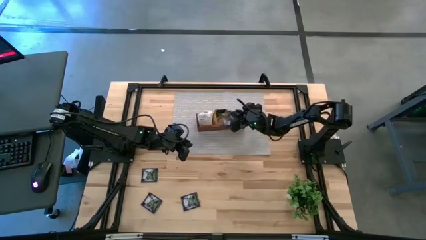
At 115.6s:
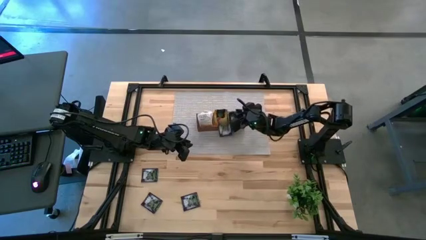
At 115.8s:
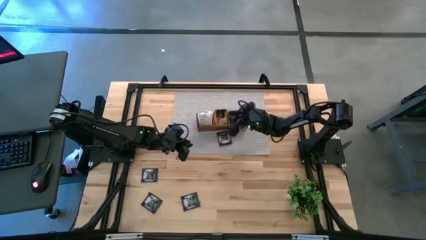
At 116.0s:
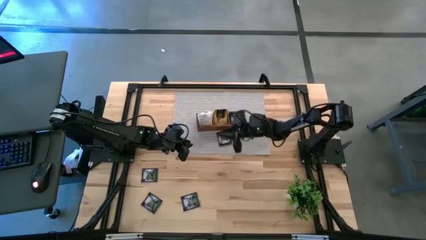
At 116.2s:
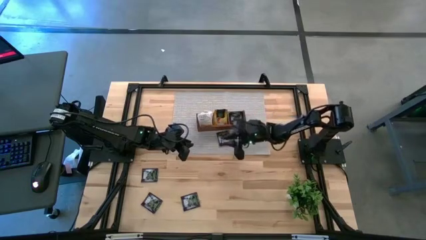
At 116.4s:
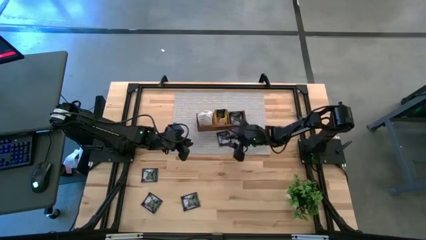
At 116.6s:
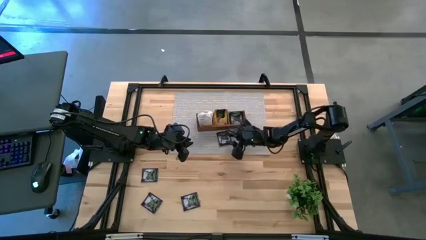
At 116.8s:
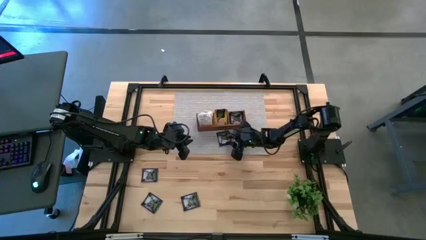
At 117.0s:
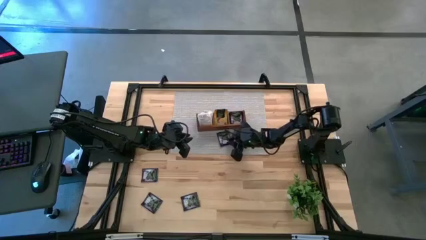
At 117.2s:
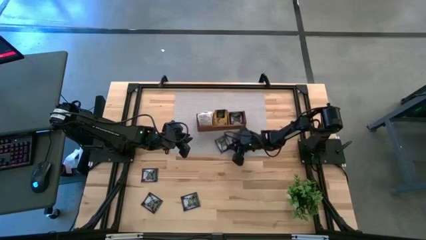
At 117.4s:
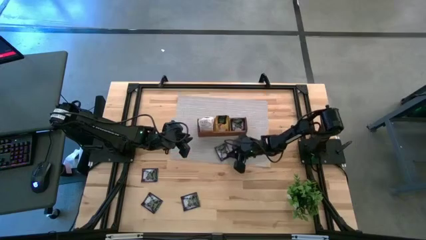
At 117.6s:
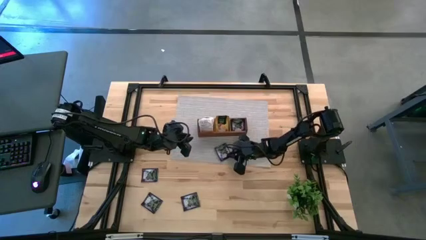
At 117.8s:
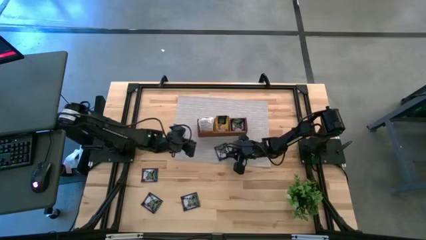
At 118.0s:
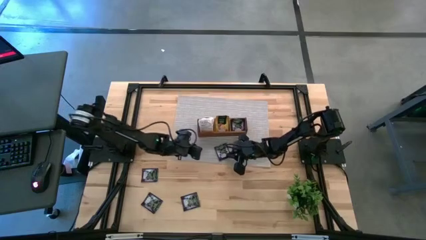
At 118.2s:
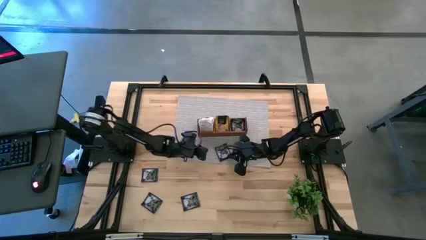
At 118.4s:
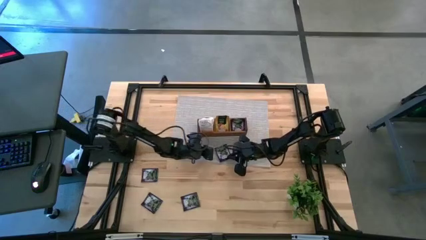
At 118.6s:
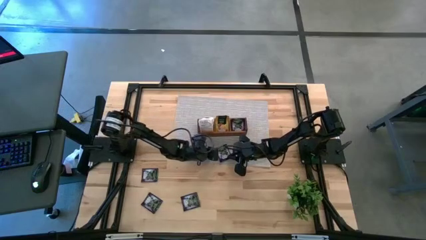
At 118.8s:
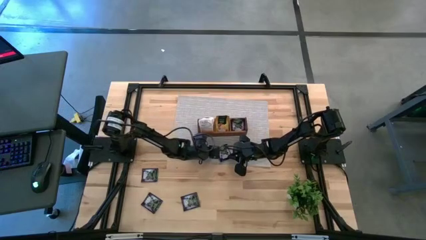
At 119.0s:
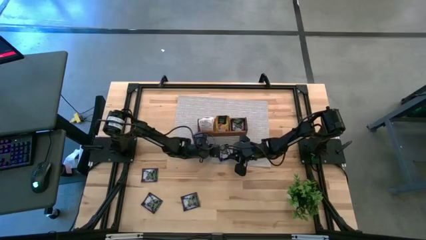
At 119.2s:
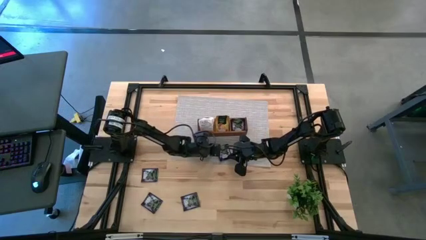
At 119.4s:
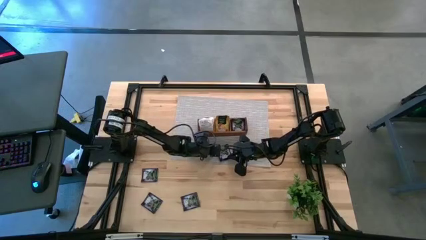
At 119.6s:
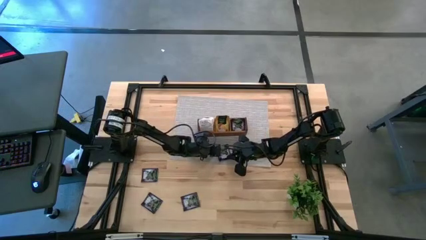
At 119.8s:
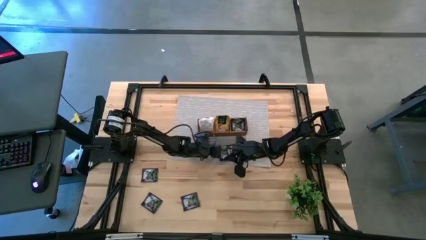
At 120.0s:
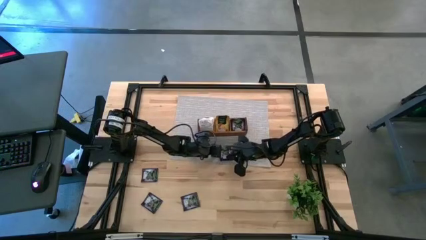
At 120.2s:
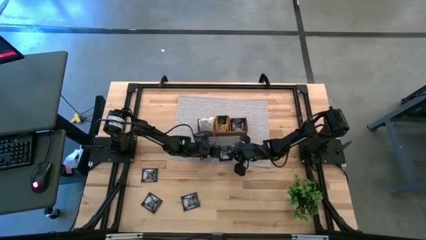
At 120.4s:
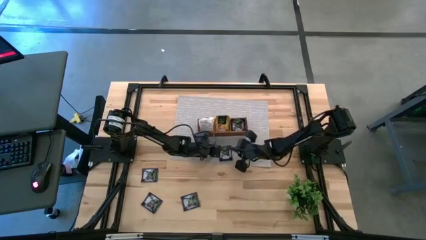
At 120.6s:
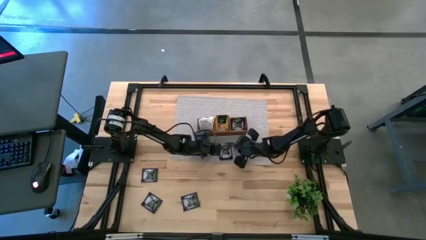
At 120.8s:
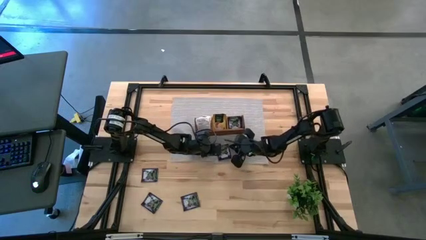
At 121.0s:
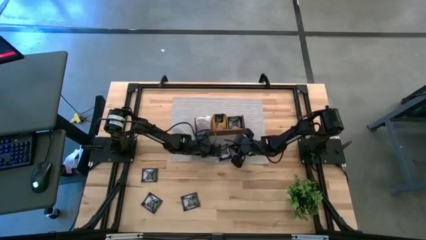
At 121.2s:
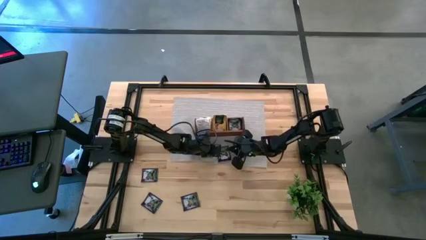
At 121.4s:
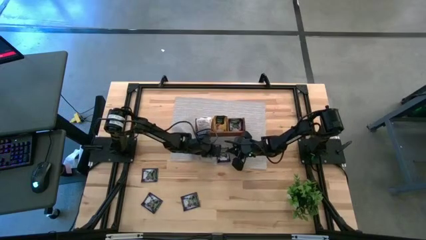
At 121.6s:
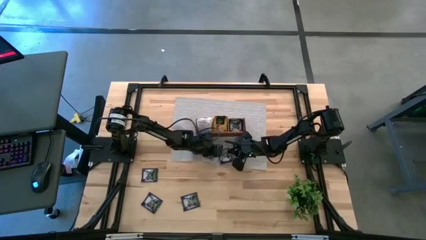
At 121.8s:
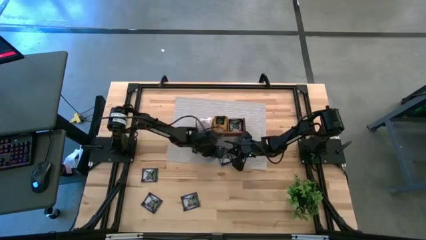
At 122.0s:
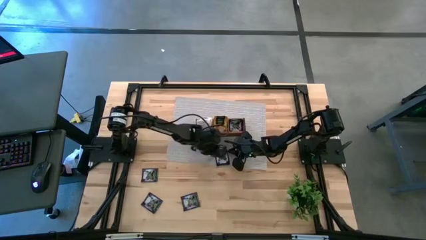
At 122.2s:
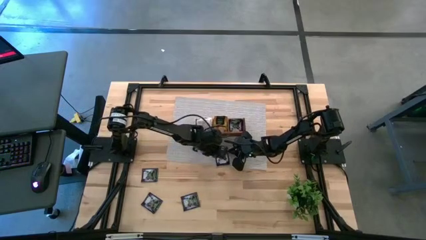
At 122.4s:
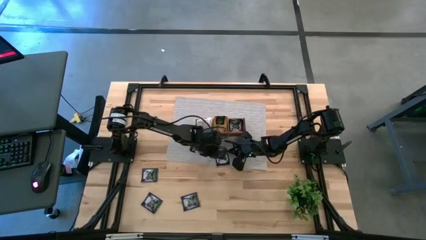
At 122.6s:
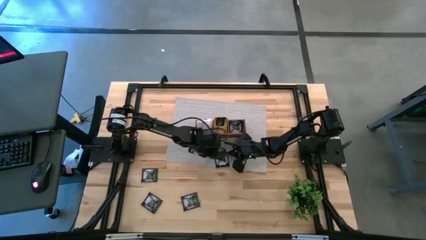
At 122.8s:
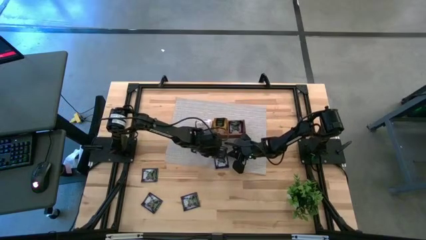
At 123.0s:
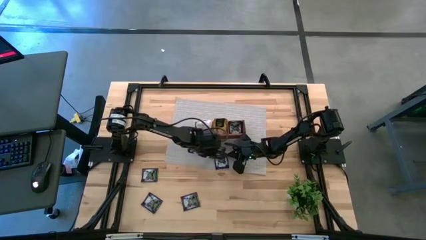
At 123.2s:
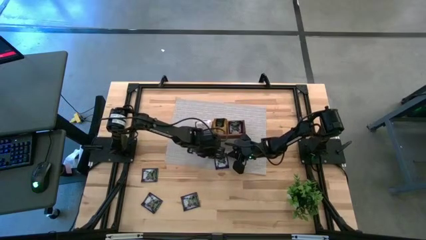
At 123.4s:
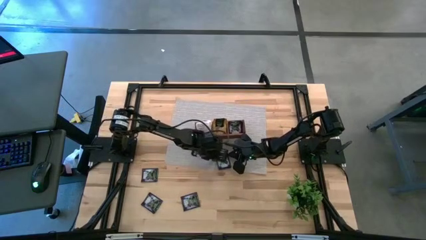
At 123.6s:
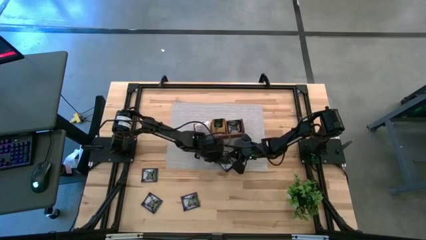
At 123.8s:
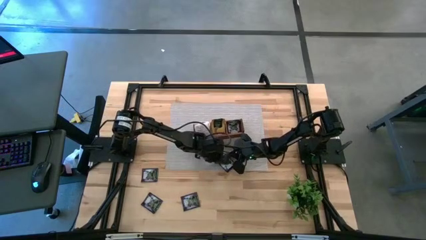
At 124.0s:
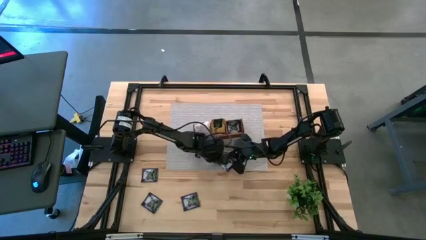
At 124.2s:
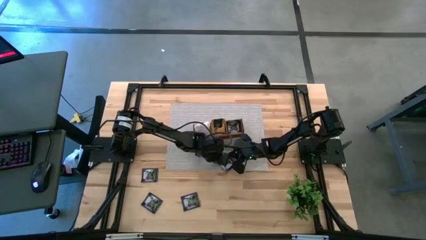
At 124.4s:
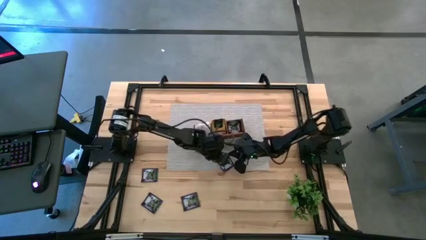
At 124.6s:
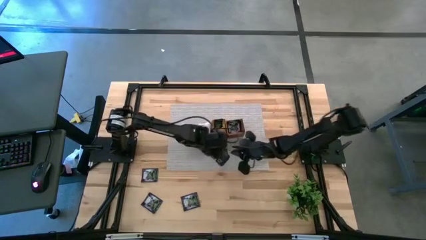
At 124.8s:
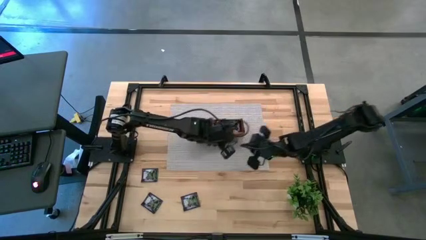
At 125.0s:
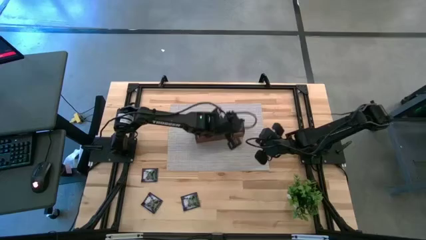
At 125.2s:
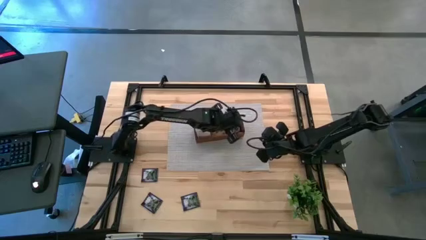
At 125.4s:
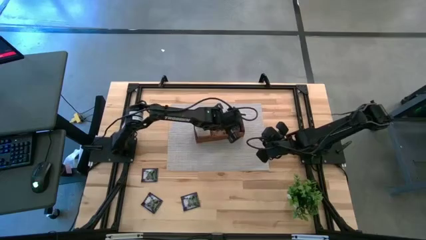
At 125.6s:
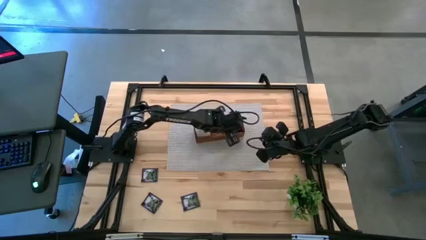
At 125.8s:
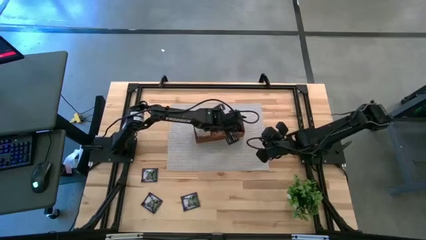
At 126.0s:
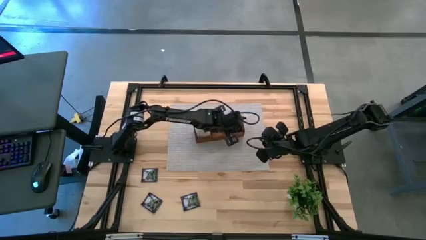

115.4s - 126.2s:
Task: Pick & Place Tea
Put the violet tea bag into the right section of the wooden organizer

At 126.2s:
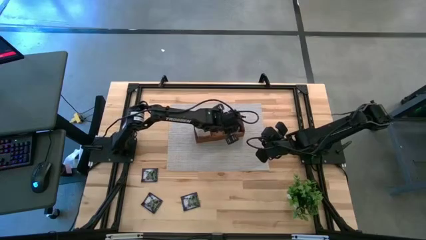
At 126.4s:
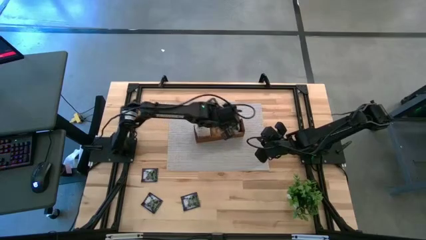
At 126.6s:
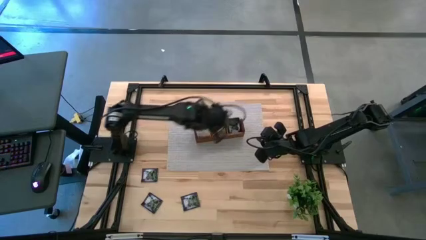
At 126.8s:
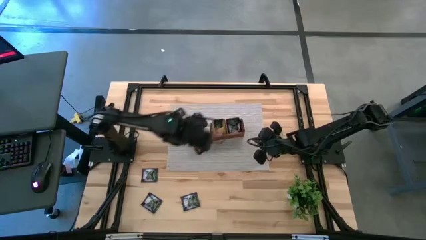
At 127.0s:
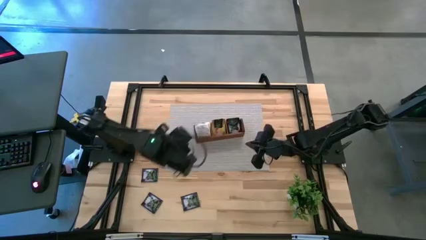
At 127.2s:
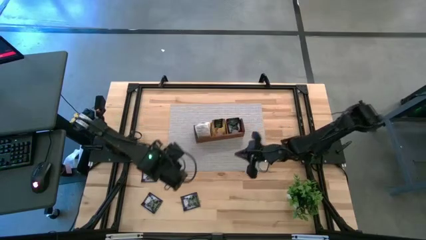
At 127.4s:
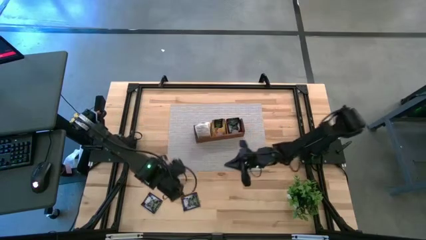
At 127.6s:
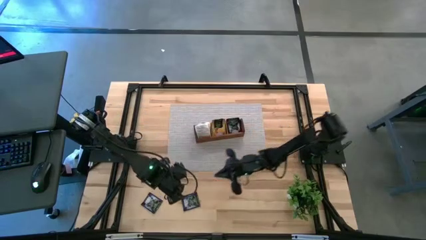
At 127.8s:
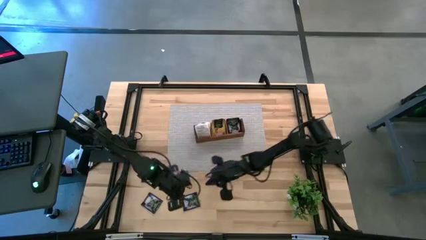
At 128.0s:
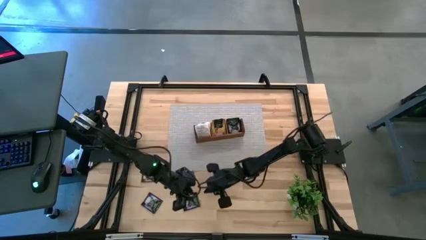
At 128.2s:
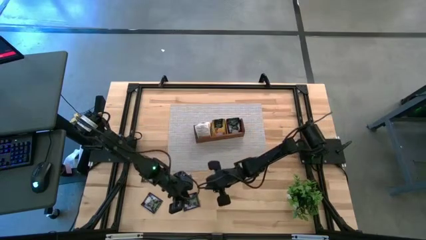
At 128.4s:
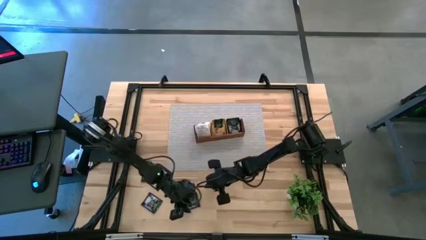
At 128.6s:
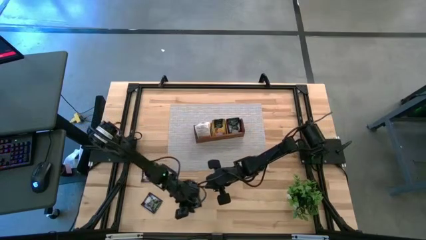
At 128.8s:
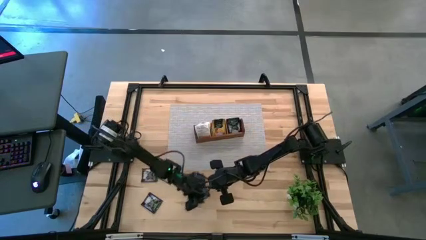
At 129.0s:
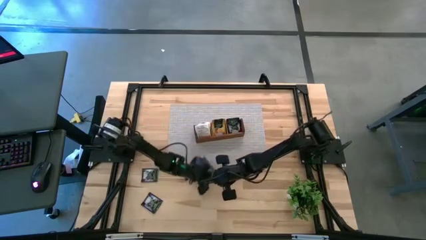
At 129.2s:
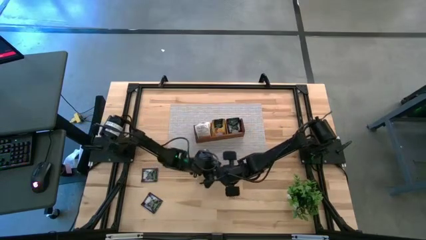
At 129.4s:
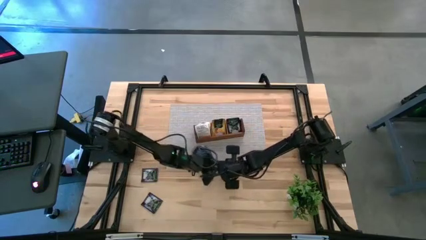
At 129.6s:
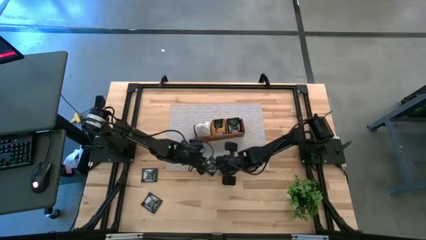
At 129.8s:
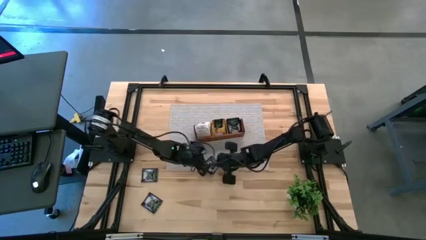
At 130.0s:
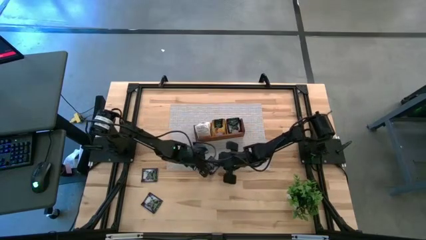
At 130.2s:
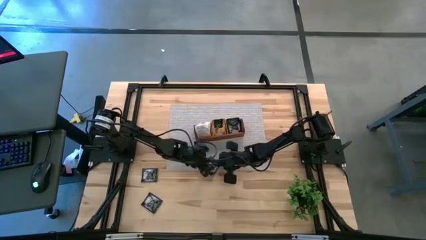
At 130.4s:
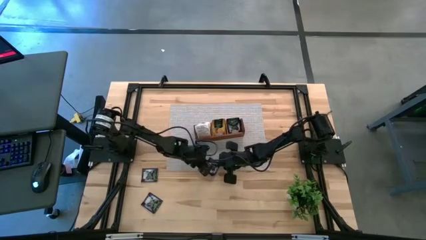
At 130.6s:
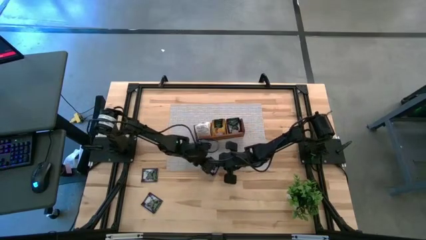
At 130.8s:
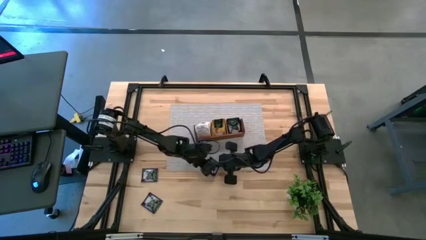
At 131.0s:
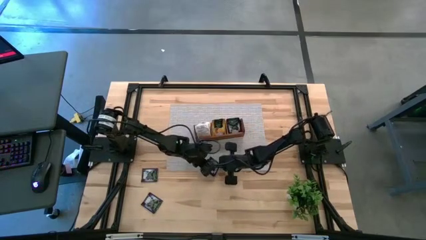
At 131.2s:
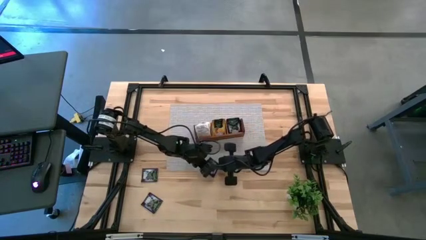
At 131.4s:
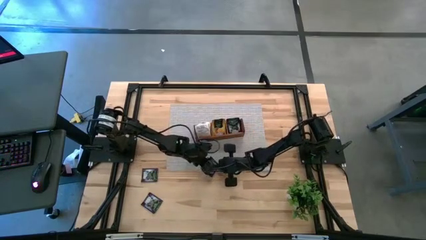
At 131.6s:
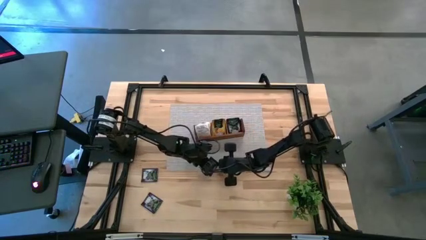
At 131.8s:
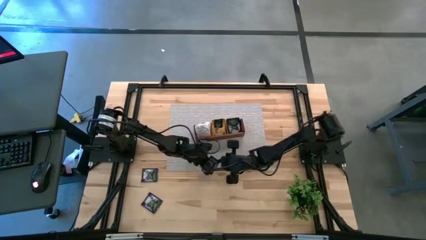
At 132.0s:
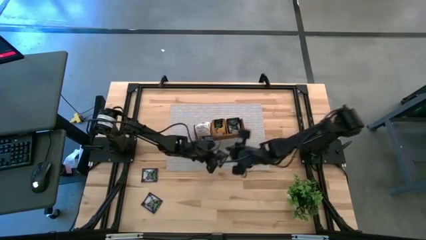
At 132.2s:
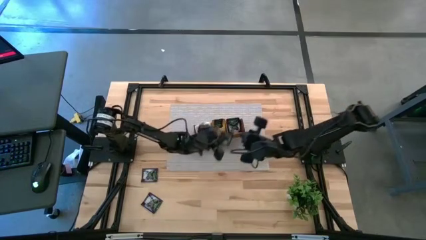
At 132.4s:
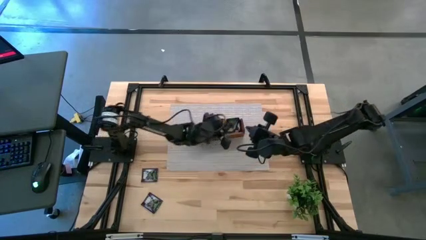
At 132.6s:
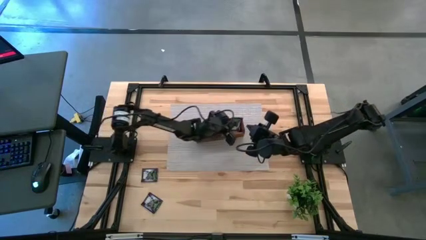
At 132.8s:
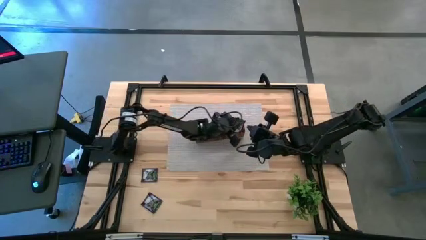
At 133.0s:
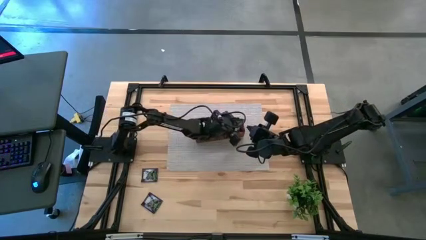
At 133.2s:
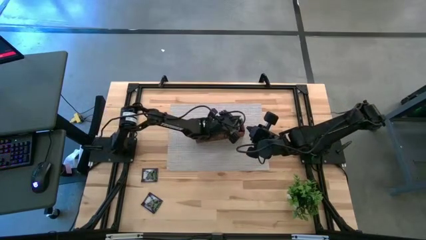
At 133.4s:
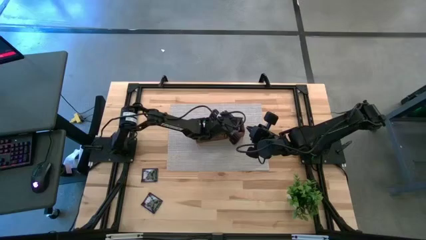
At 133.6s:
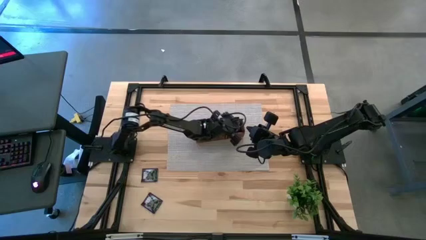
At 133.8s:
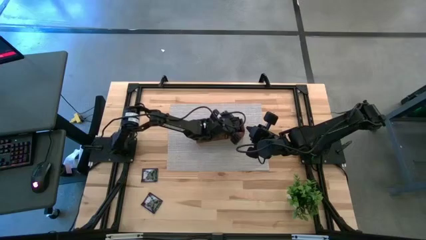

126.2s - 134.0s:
Put the violet tea bag into the right section of the wooden organizer
